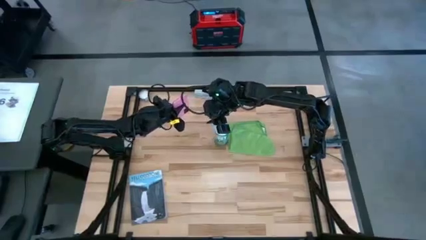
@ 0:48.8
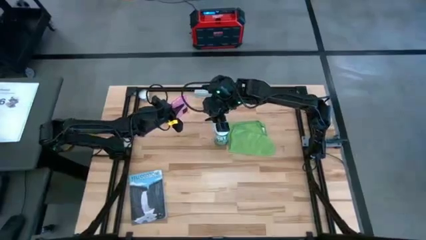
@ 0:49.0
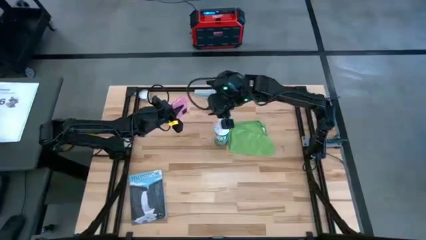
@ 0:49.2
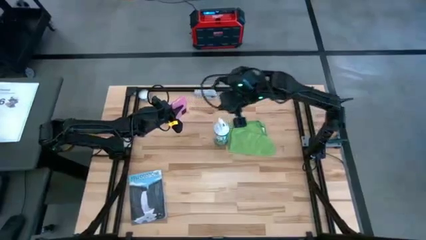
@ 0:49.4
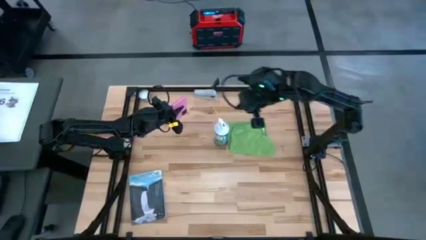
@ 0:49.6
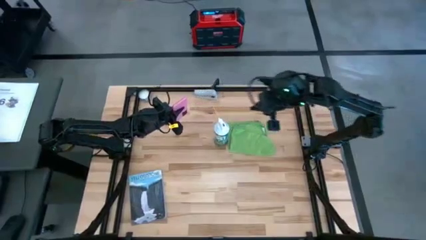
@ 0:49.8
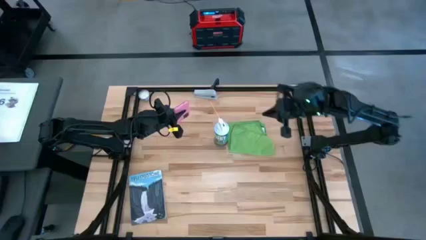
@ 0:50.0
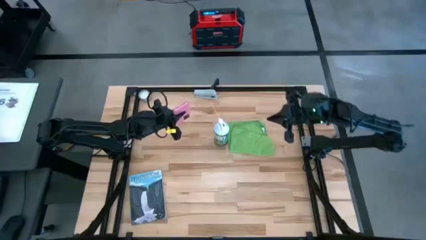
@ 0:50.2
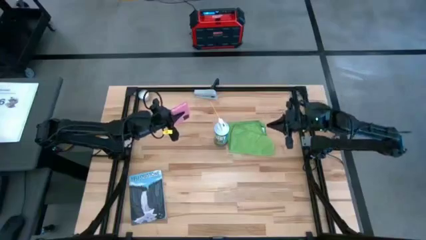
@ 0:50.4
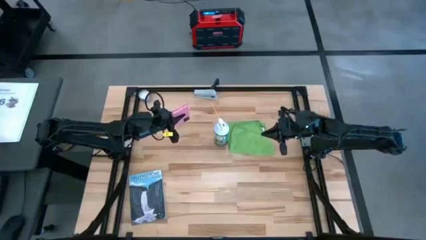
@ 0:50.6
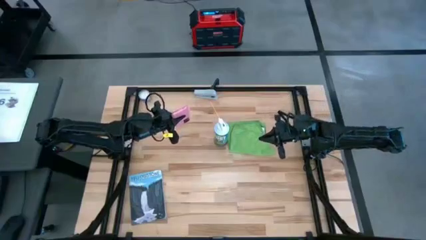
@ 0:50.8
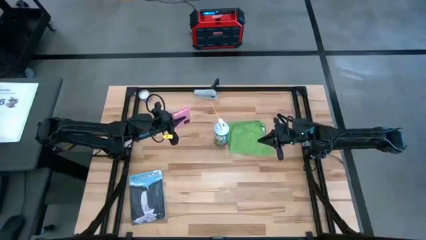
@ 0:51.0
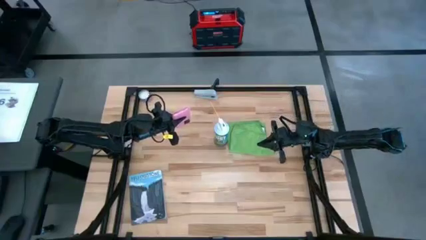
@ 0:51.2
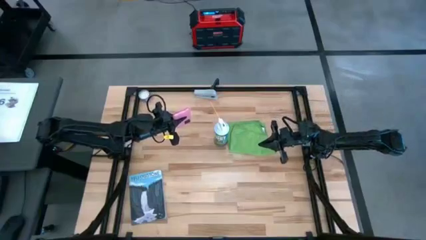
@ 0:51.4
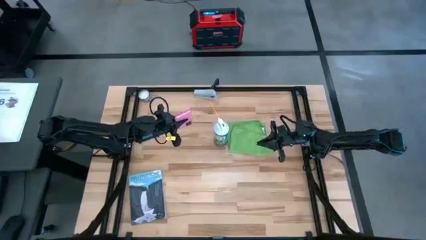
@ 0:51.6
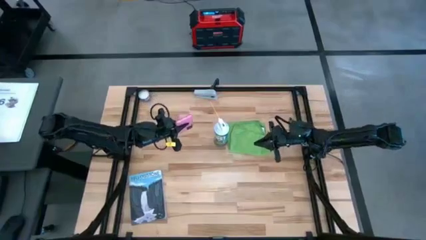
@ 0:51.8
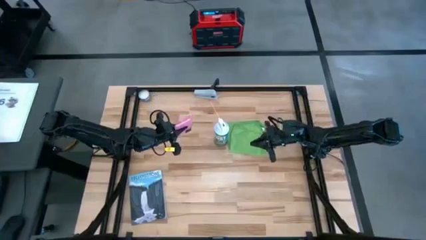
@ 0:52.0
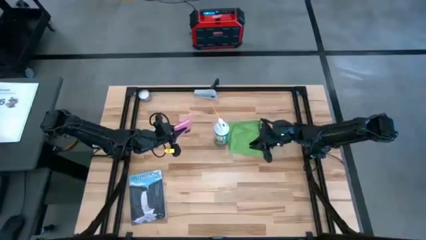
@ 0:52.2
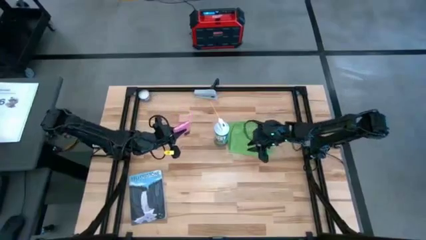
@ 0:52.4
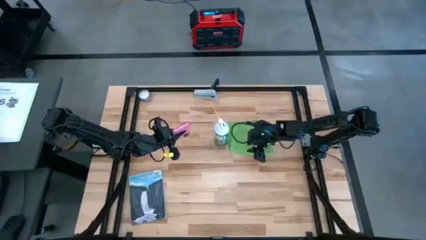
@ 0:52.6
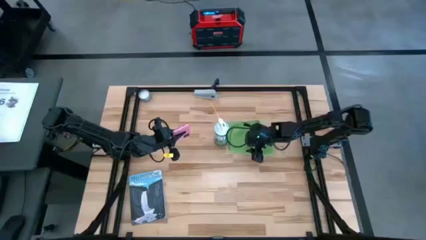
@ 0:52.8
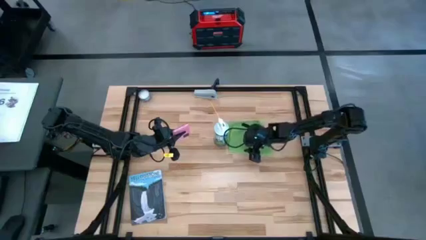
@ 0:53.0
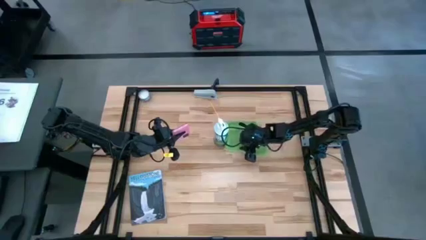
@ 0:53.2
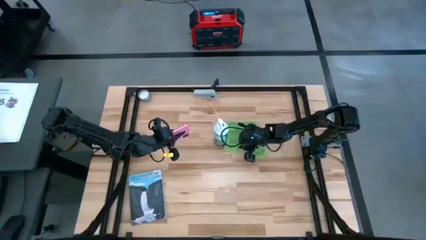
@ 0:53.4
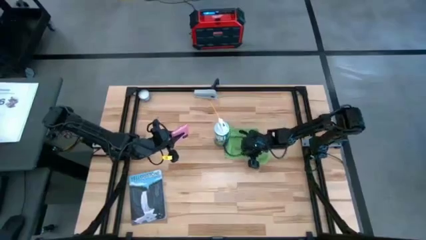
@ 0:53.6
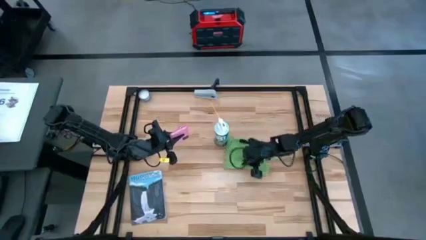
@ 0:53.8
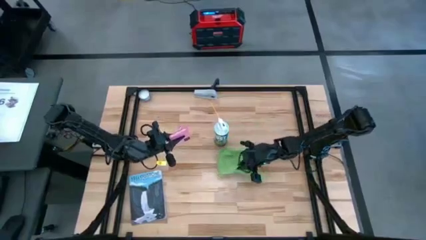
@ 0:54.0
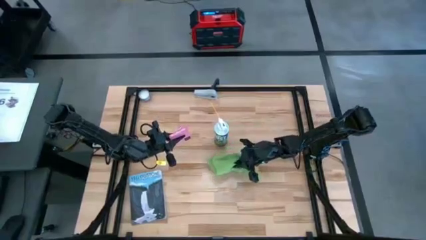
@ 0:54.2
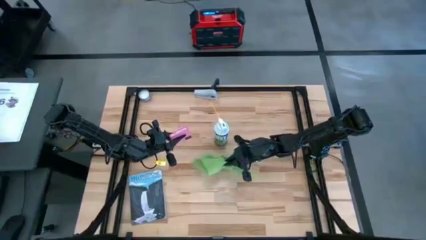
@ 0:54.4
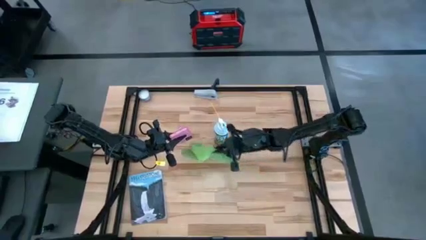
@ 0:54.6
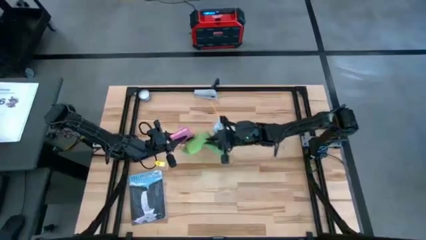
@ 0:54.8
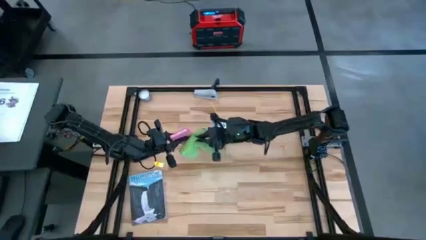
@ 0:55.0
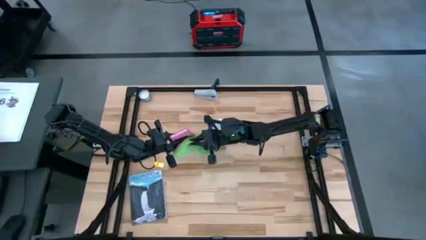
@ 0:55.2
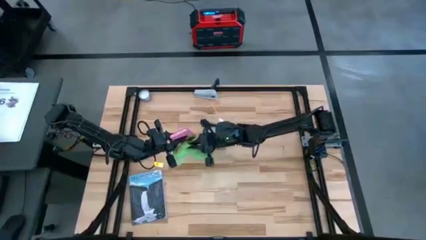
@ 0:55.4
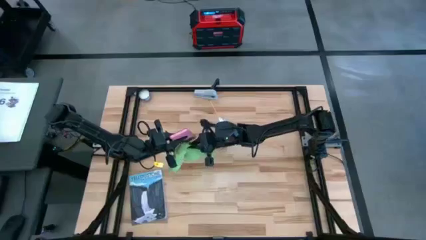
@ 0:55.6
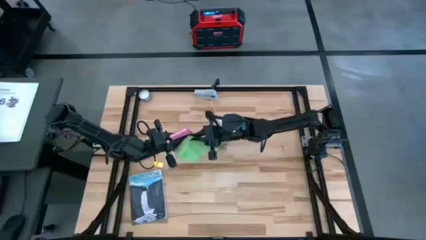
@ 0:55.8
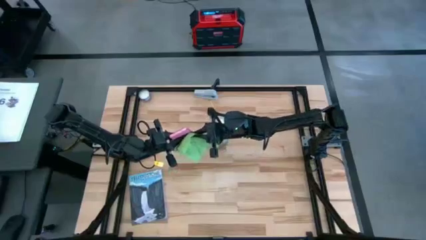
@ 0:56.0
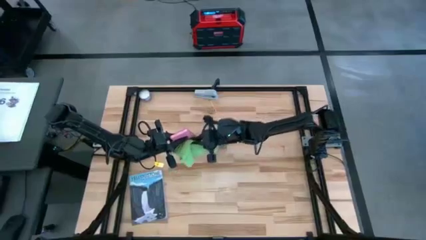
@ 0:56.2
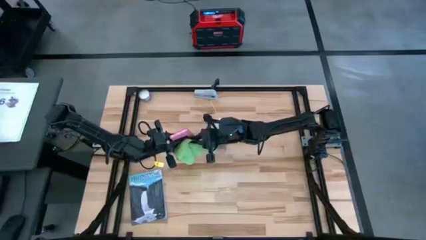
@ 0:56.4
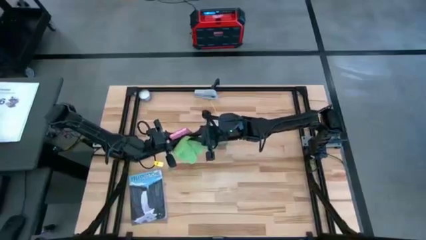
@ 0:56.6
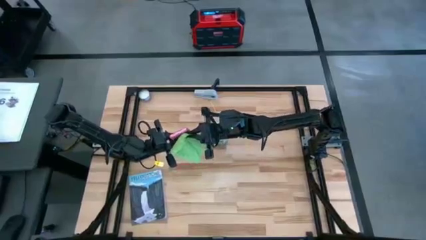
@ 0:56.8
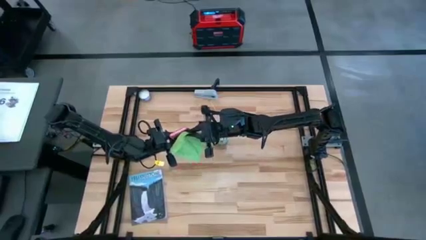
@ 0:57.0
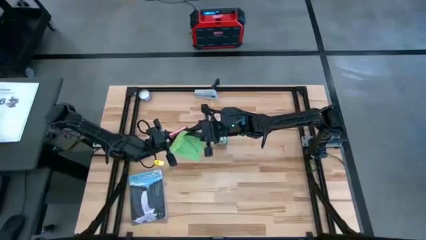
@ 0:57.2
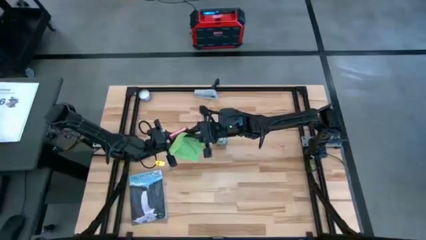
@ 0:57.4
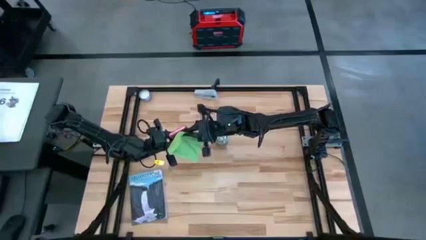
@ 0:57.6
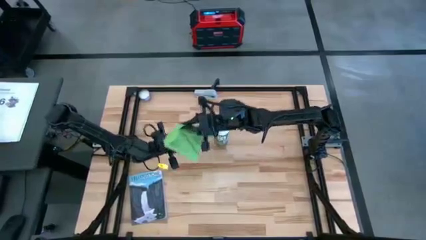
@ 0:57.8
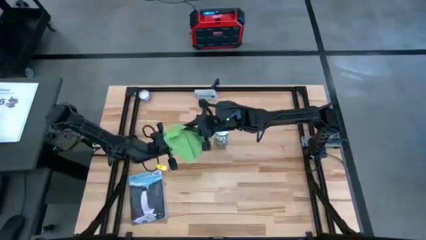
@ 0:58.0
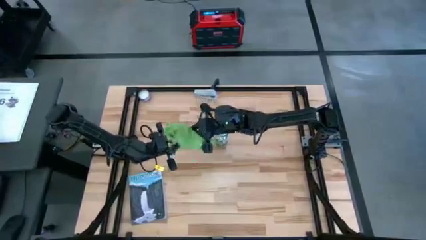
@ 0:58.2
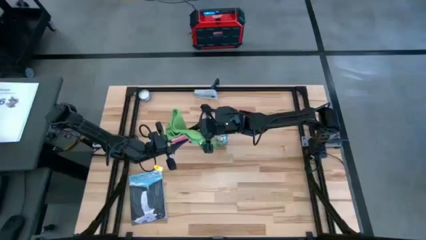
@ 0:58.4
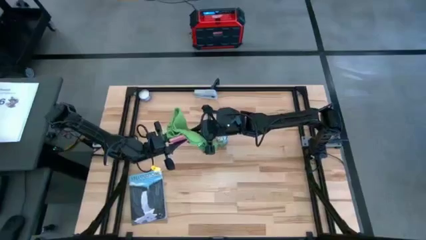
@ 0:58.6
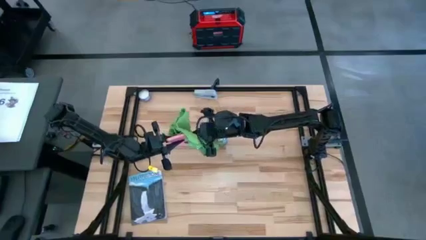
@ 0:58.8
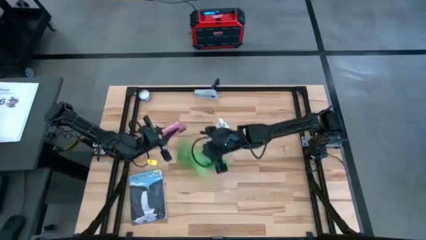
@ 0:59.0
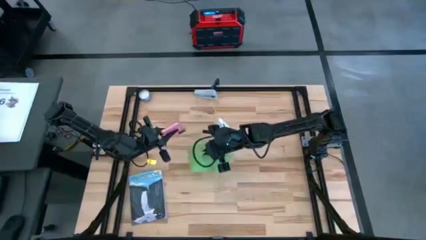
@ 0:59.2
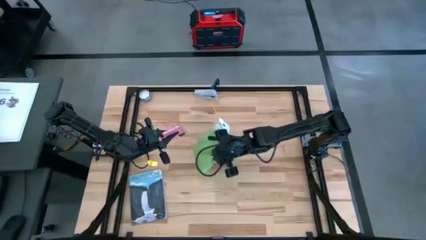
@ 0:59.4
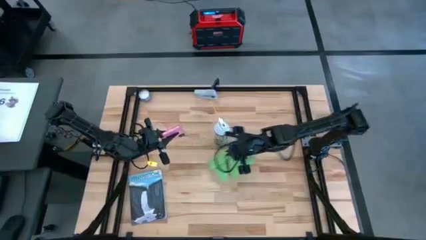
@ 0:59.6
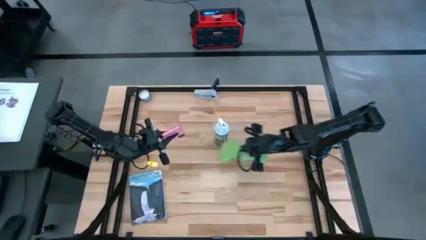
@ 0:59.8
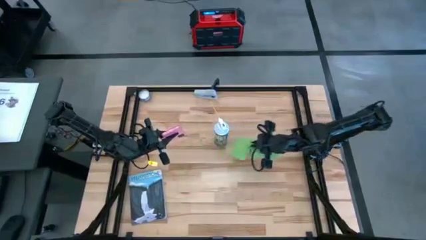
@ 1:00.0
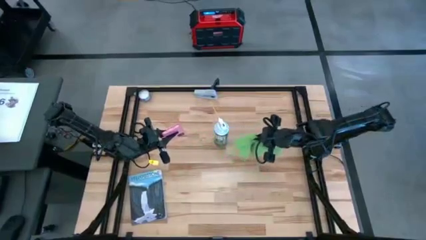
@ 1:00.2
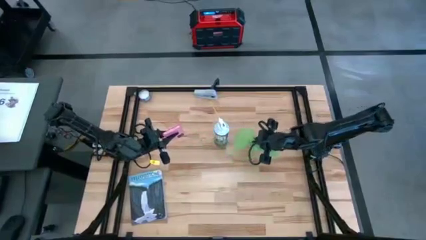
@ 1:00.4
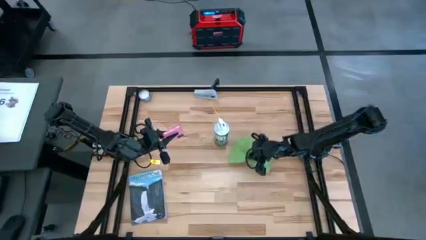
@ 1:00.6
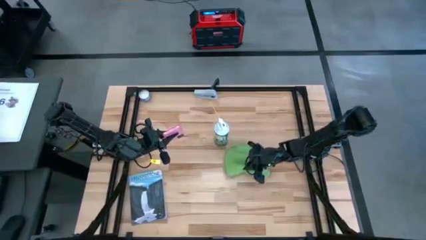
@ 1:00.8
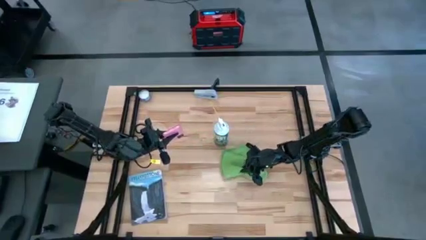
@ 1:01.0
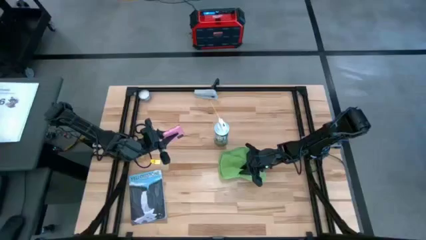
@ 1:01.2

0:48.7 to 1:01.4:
Task: Apply microfiber cloth
Wipe pink cellphone with a microfiber cloth
